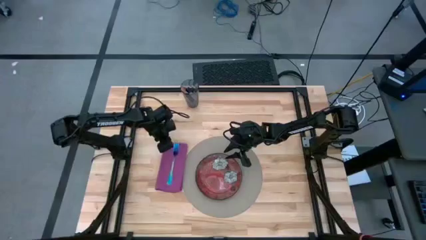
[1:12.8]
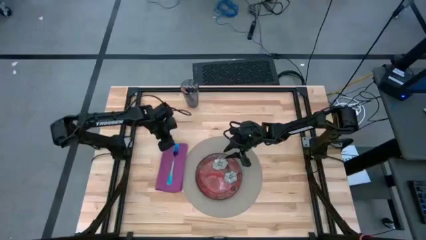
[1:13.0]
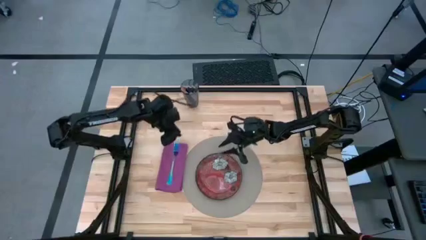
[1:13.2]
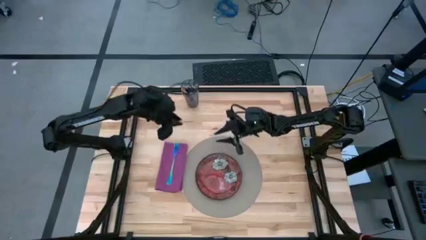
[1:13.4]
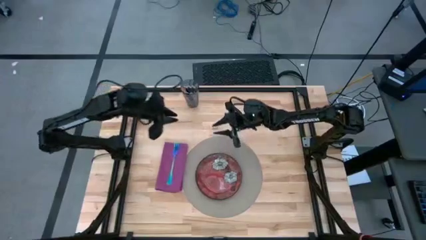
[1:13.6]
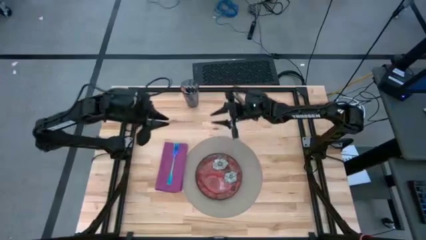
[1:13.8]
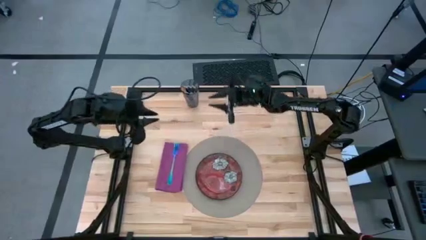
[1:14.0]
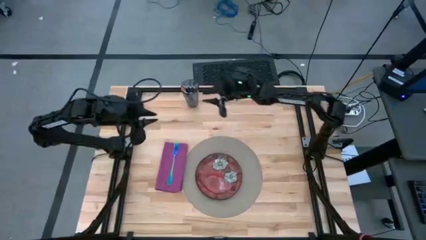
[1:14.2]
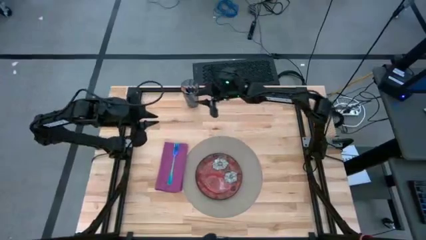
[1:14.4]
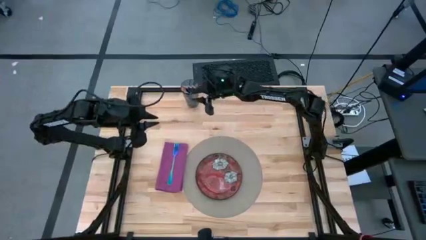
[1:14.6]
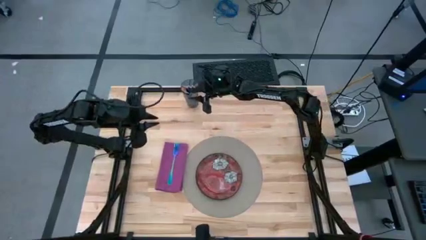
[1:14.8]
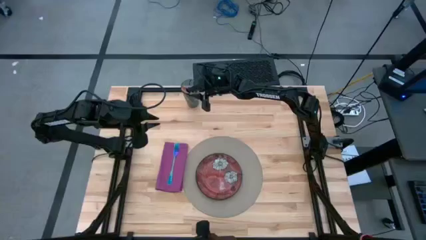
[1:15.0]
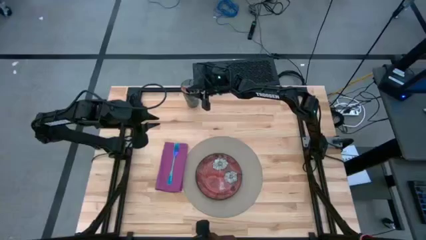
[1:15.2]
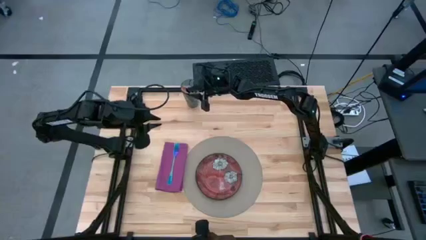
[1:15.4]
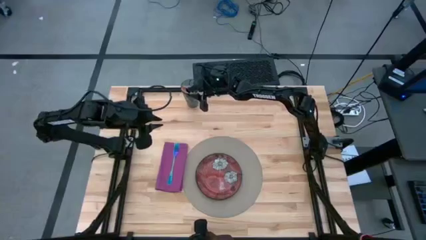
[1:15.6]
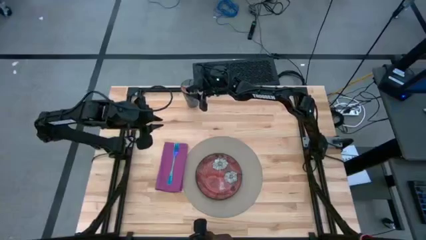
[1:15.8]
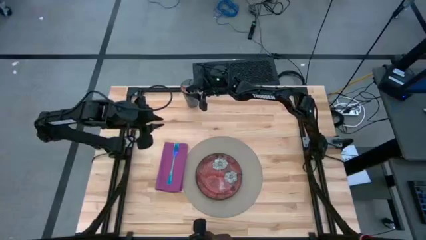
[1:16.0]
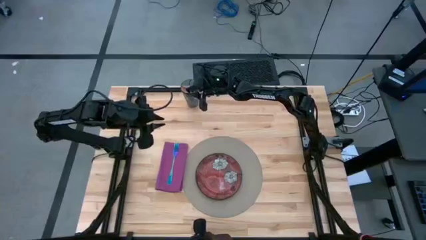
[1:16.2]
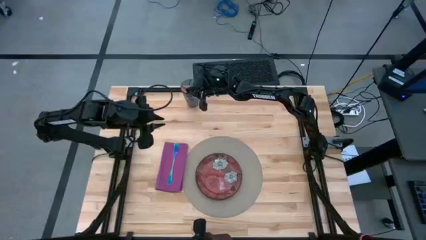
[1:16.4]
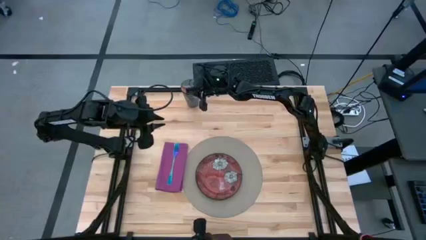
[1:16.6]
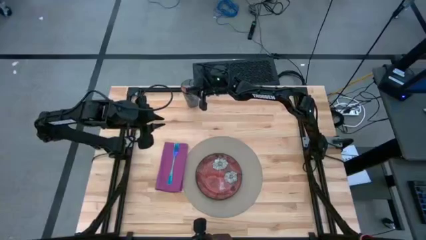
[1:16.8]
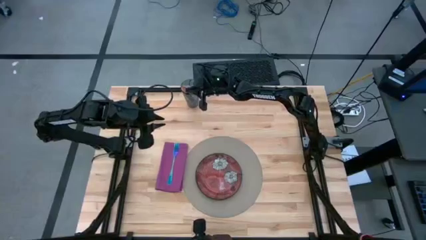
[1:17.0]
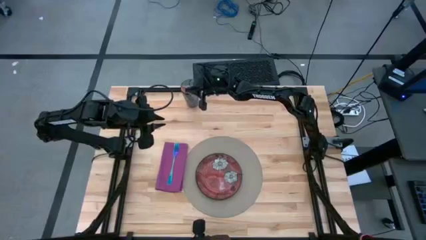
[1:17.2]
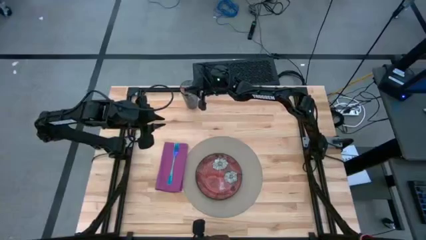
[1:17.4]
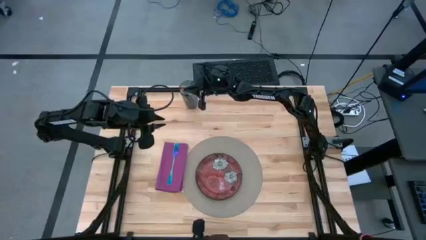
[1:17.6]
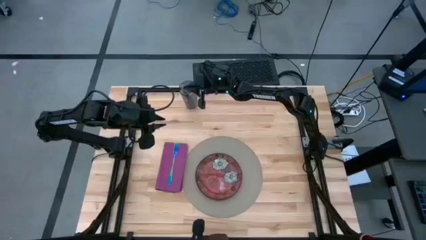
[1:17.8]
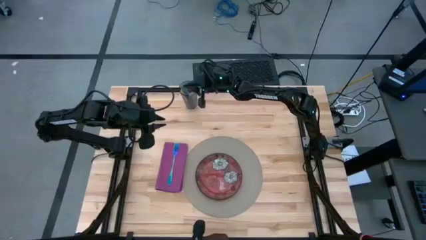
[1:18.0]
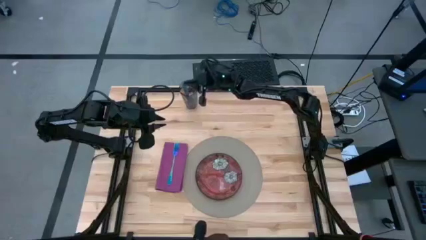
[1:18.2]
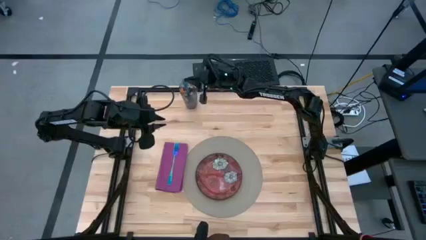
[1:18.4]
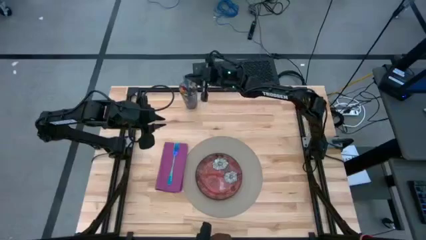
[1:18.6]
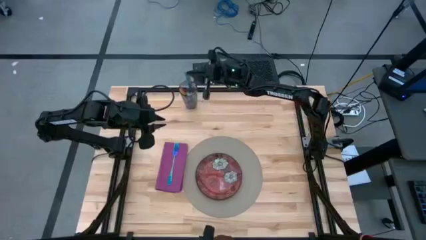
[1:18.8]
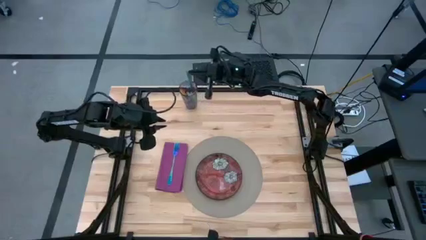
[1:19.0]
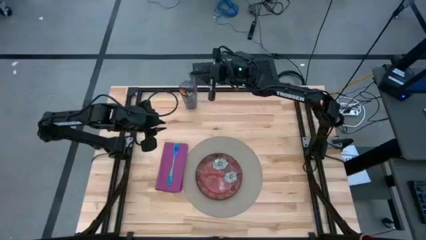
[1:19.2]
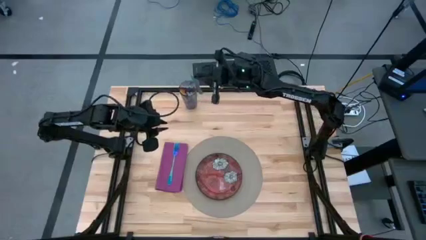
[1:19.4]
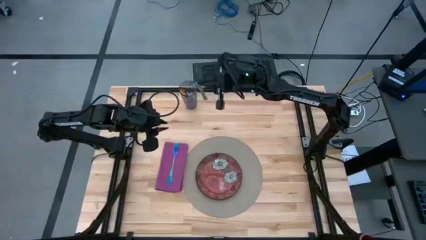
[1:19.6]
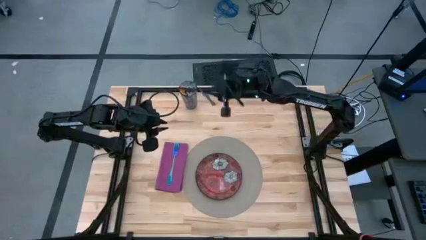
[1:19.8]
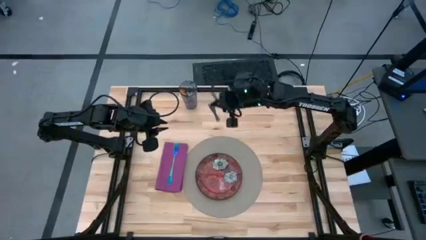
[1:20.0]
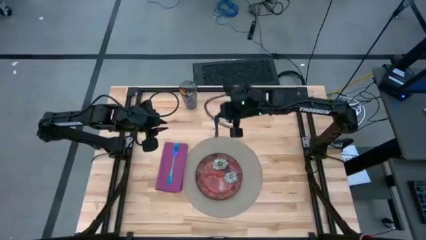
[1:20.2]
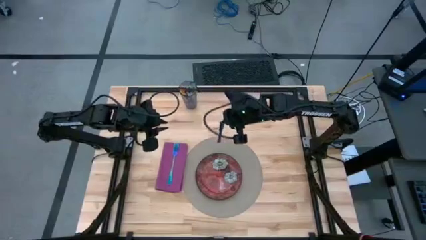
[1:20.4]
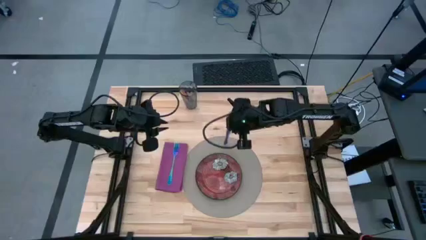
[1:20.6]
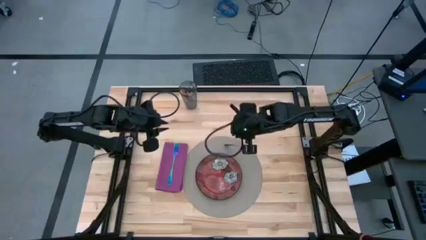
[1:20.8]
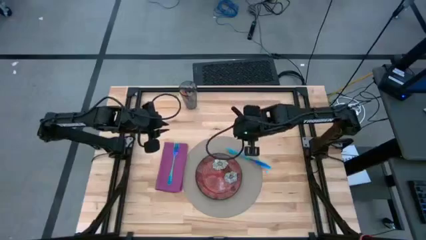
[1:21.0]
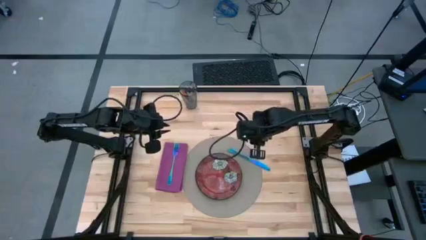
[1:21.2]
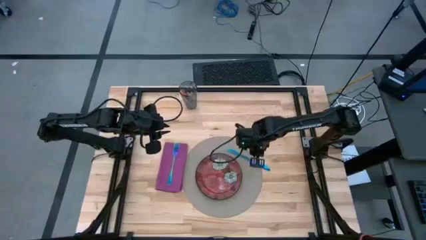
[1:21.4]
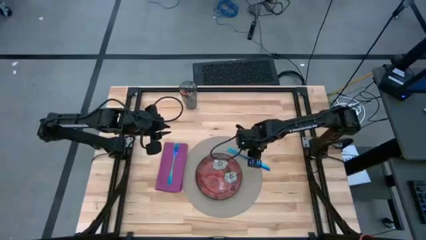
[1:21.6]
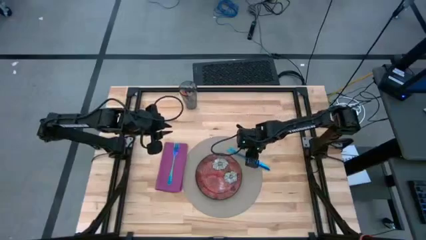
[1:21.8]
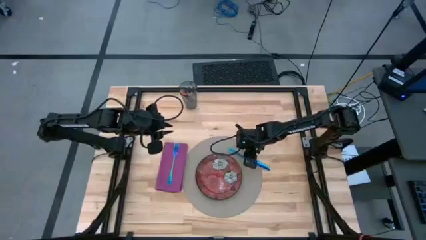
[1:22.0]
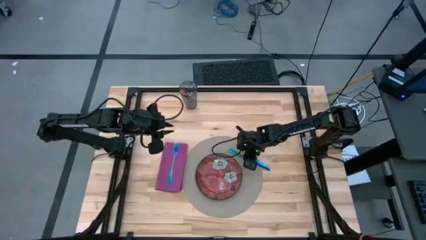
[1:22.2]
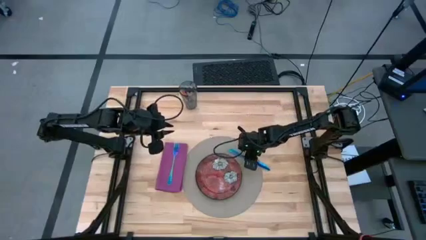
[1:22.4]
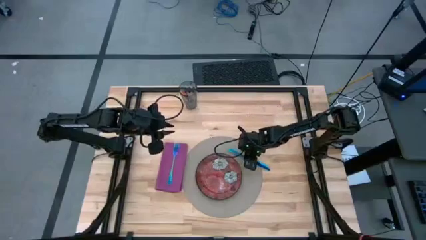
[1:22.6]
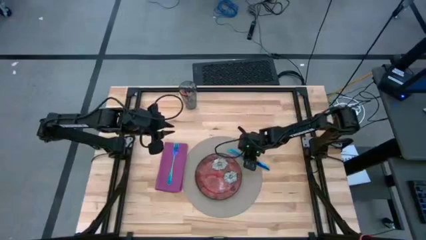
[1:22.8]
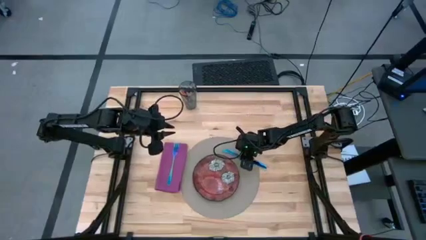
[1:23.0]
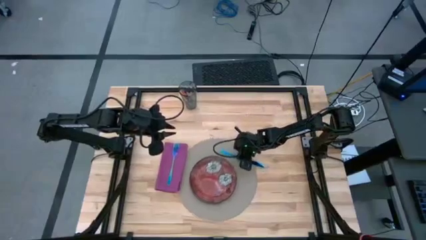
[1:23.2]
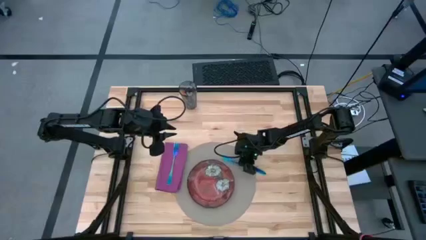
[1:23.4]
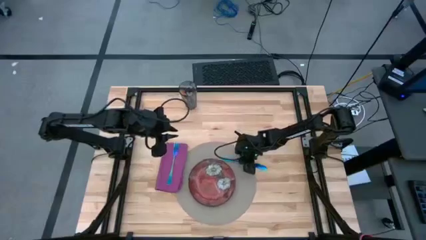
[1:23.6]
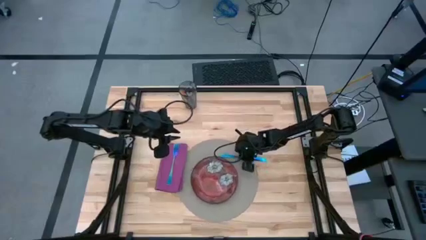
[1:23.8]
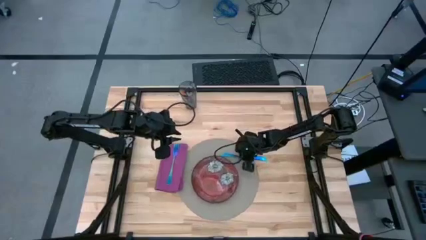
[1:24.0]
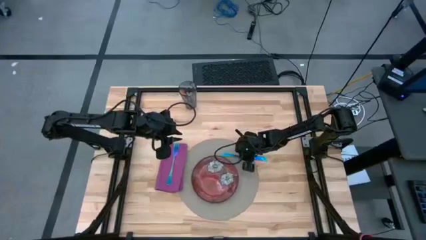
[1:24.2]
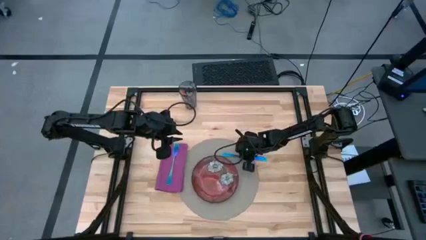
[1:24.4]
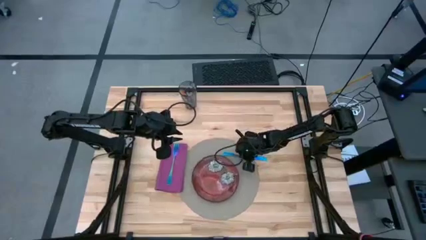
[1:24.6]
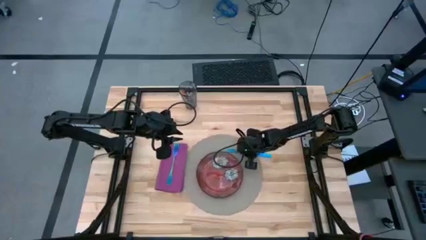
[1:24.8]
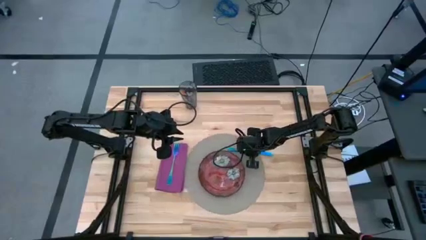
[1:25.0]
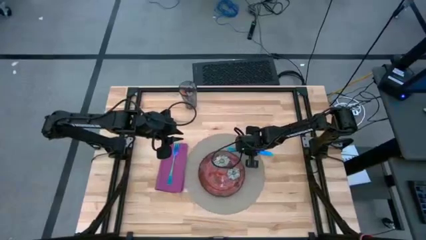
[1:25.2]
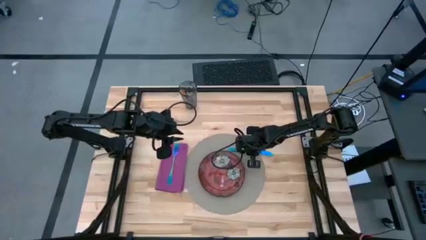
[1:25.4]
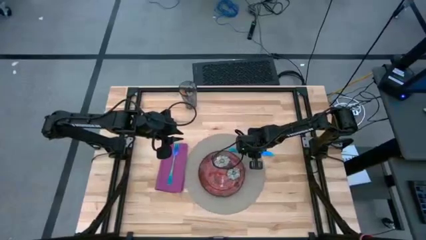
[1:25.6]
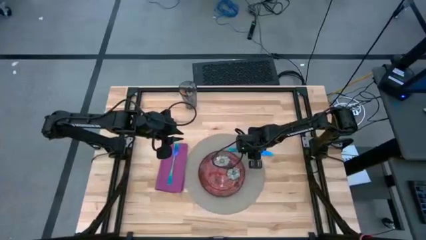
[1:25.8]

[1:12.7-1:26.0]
Task: Set table place
Put the blue knife on the middle right of the table

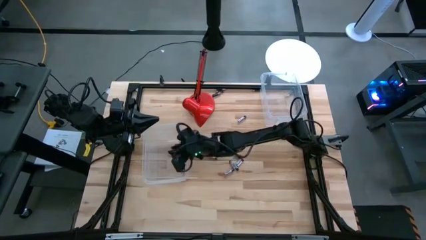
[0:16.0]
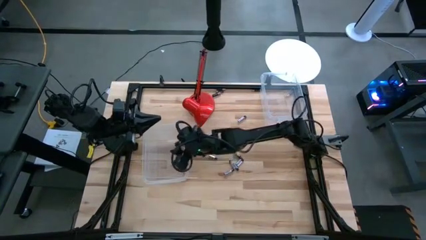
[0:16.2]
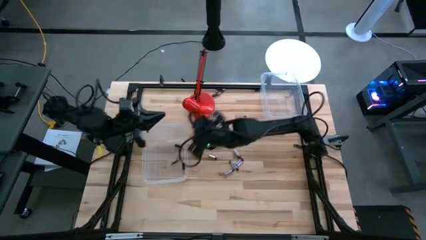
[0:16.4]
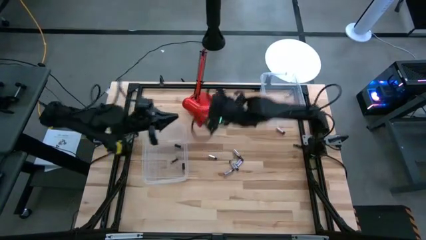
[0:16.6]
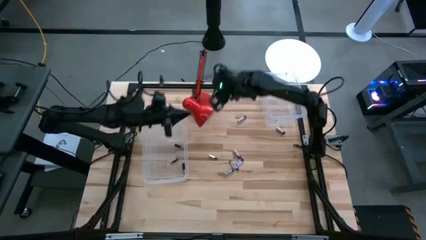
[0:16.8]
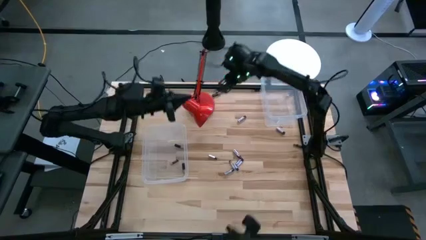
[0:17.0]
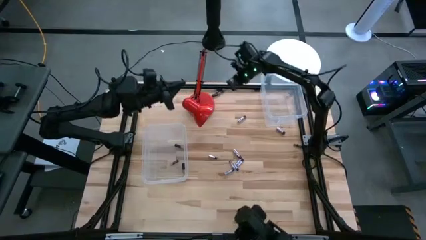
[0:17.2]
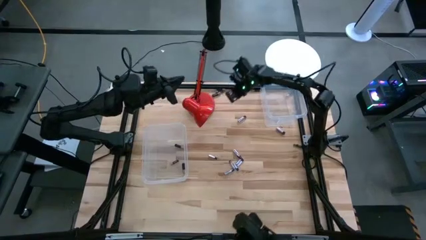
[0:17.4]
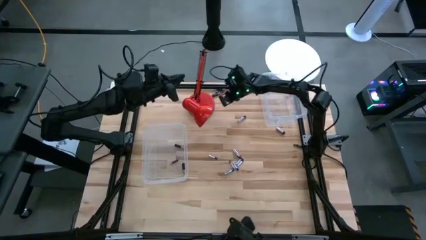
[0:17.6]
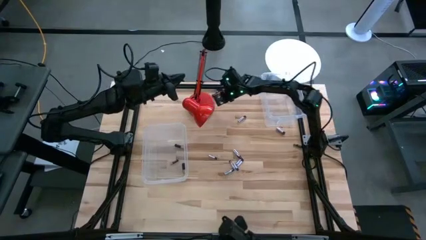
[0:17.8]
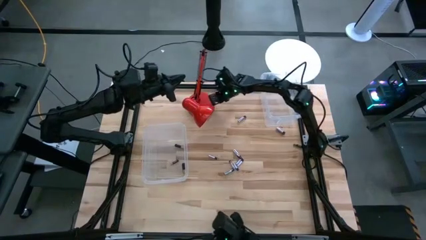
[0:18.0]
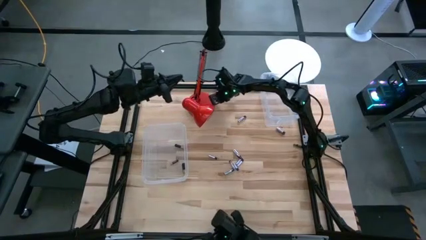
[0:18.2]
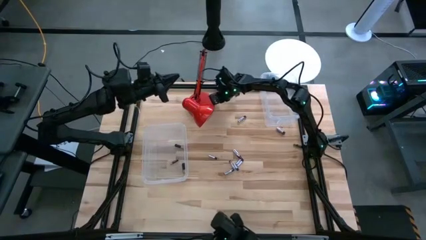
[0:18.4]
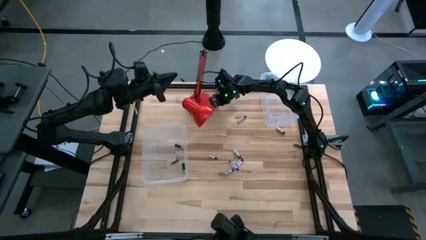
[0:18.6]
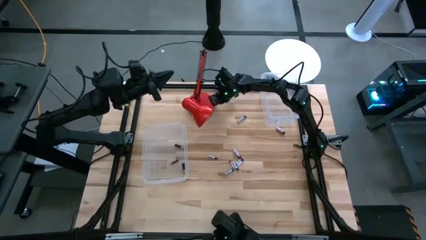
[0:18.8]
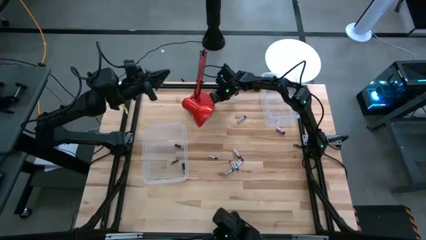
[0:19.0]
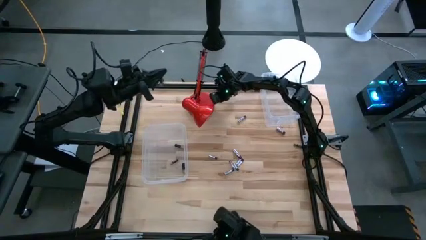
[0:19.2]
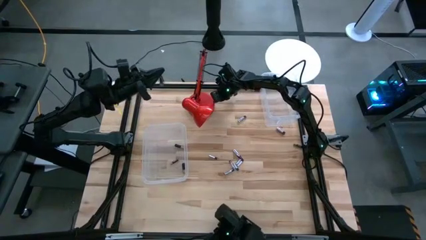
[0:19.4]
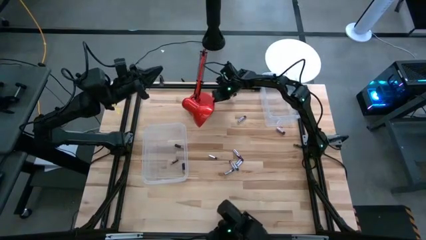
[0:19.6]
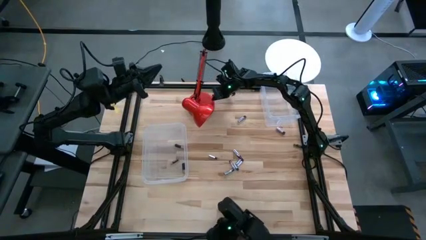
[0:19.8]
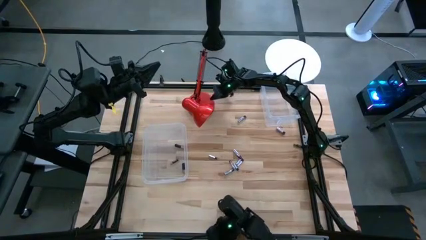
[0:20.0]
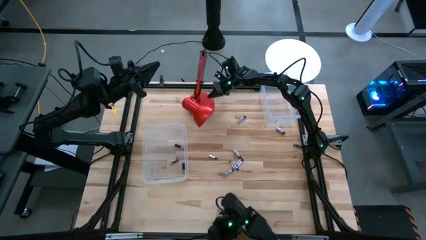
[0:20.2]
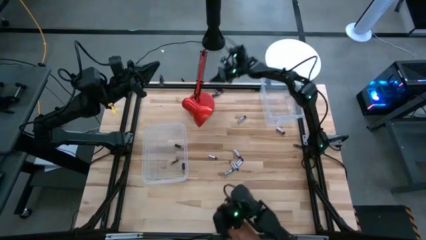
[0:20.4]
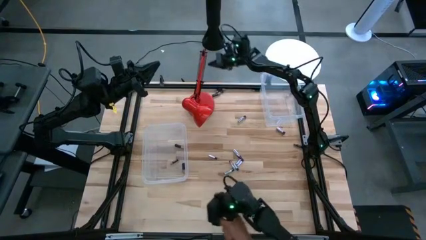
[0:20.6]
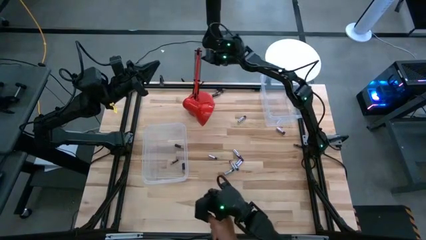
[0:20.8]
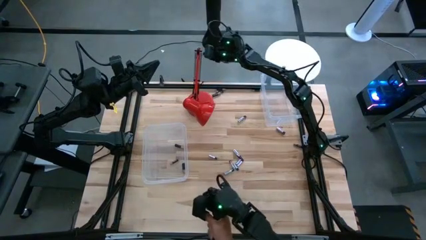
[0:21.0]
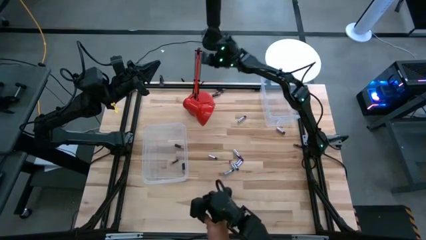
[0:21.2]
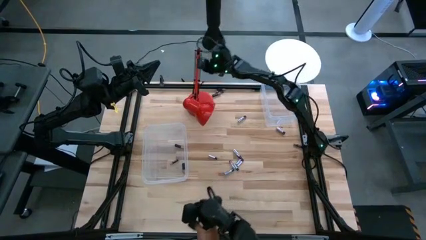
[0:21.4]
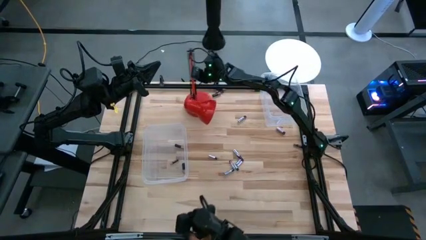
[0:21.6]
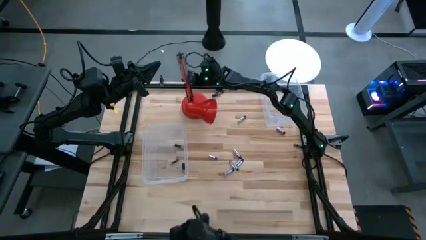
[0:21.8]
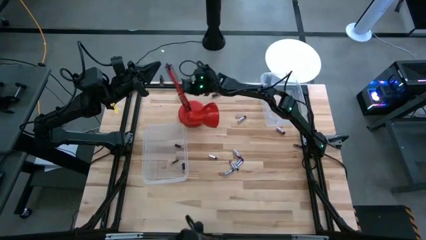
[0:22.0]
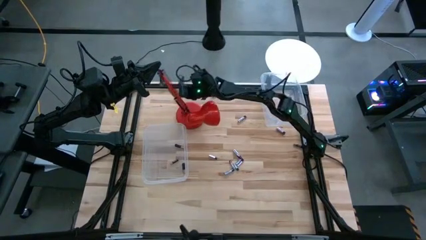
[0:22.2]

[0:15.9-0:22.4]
Task: Sort batteries
Adjust the red lamp
